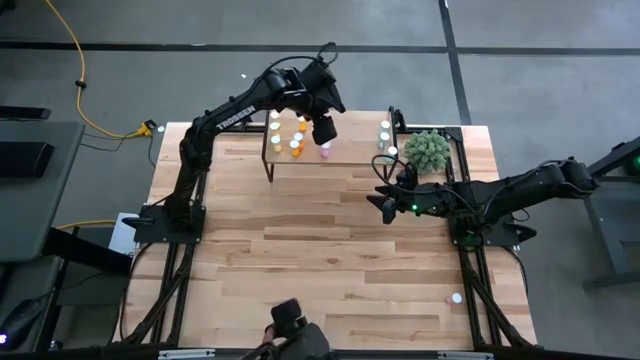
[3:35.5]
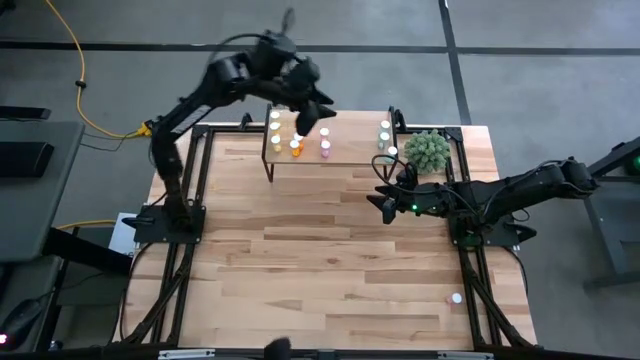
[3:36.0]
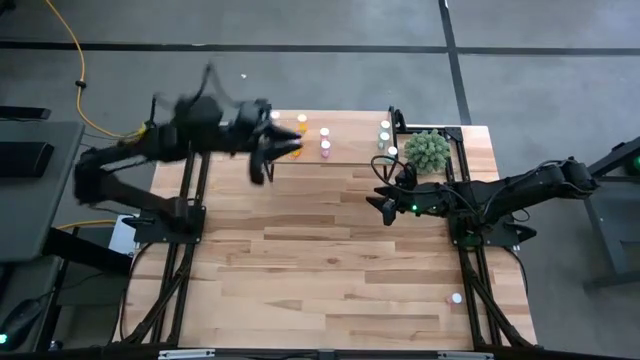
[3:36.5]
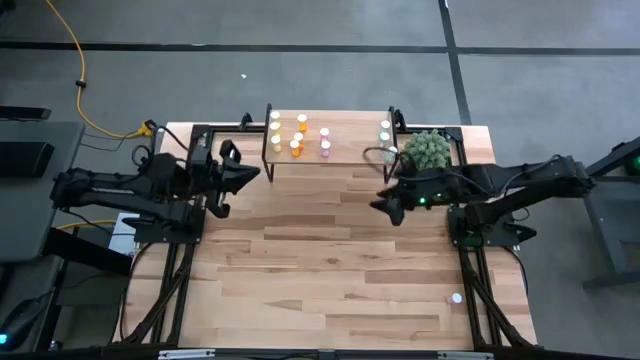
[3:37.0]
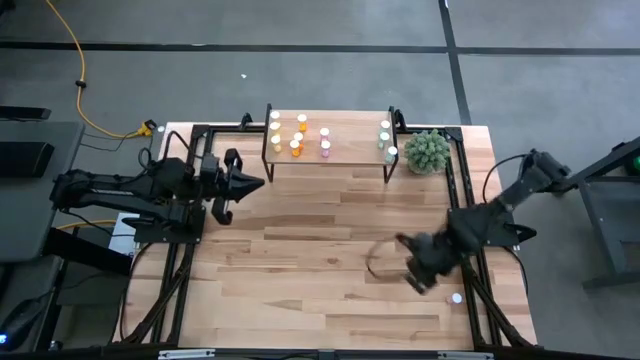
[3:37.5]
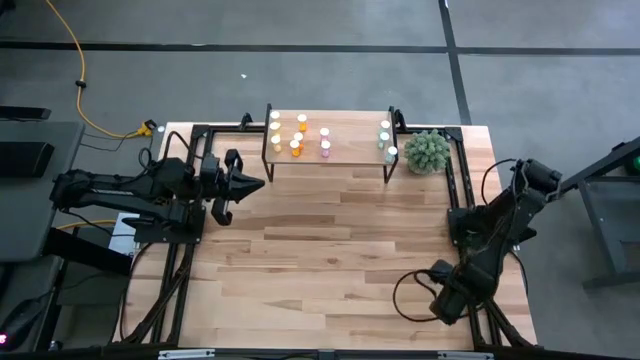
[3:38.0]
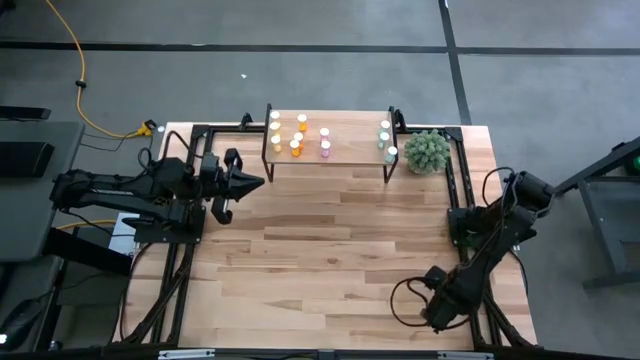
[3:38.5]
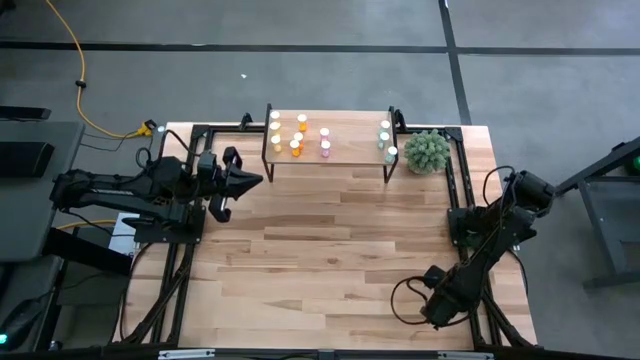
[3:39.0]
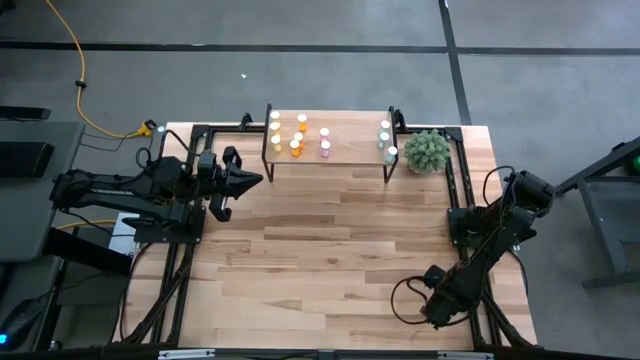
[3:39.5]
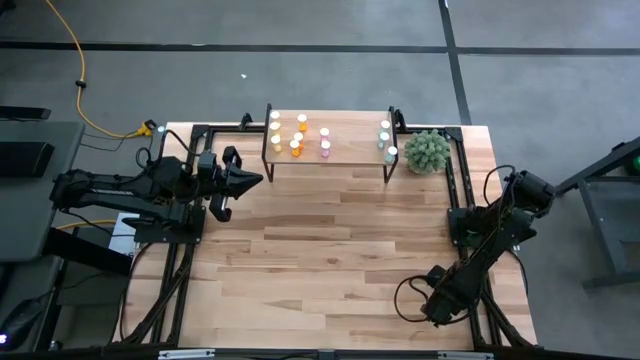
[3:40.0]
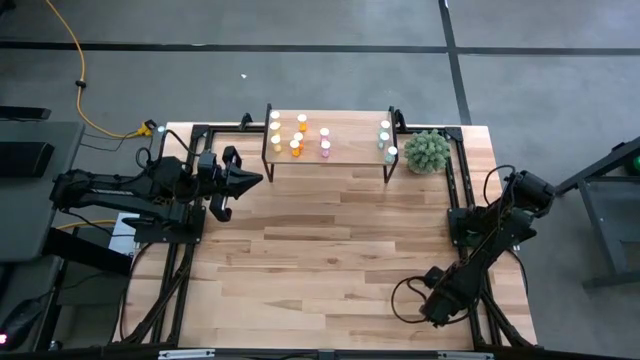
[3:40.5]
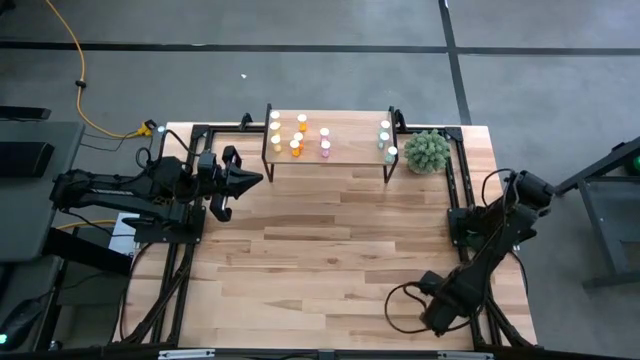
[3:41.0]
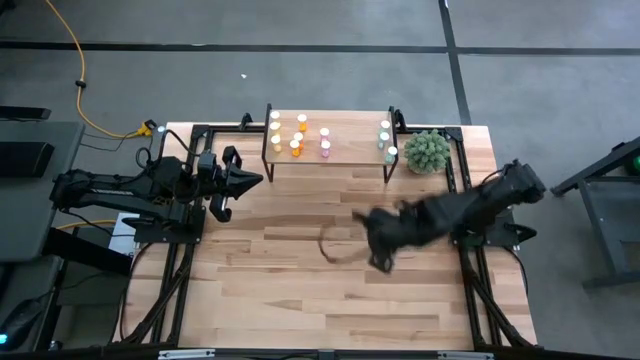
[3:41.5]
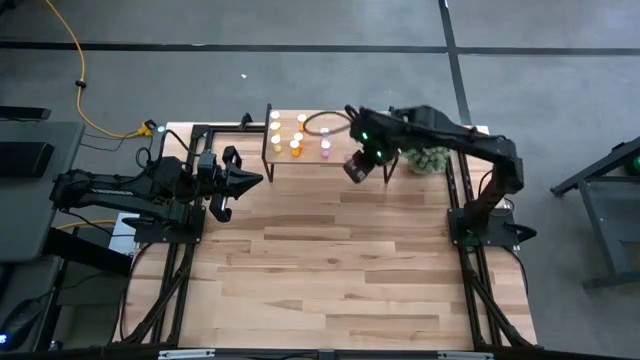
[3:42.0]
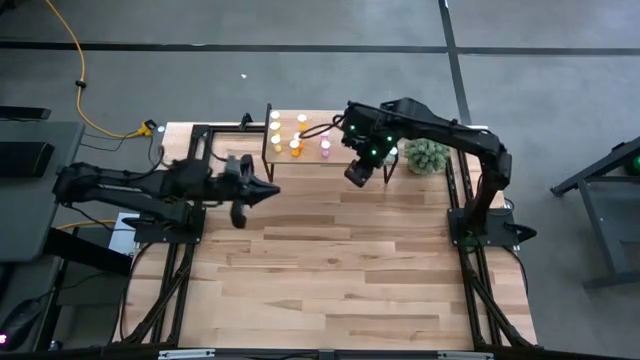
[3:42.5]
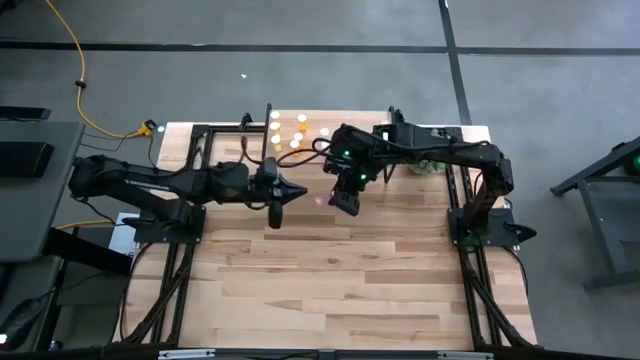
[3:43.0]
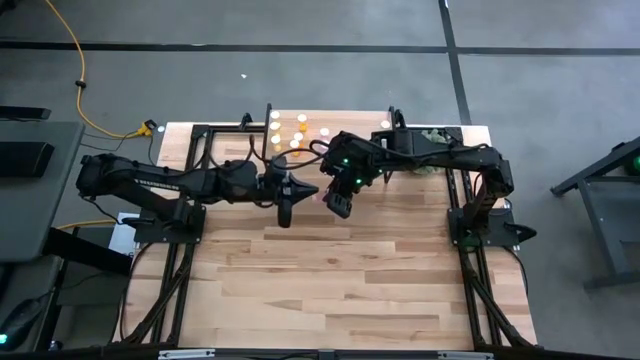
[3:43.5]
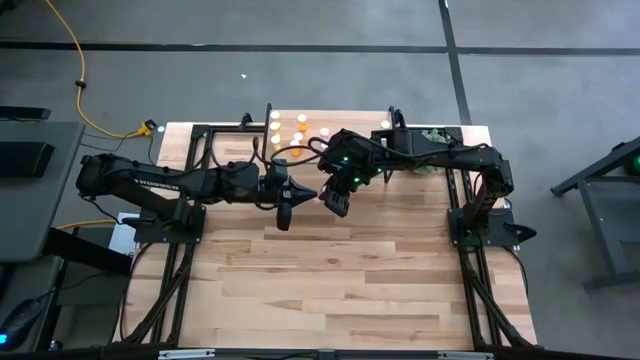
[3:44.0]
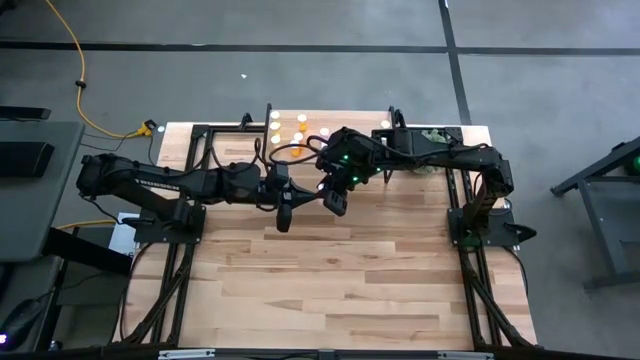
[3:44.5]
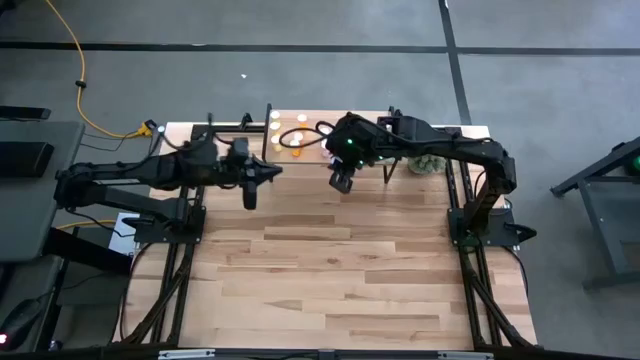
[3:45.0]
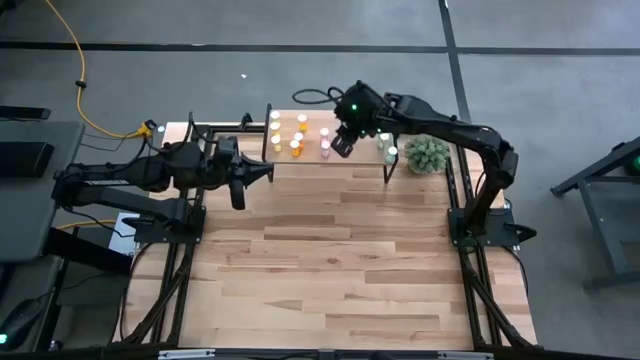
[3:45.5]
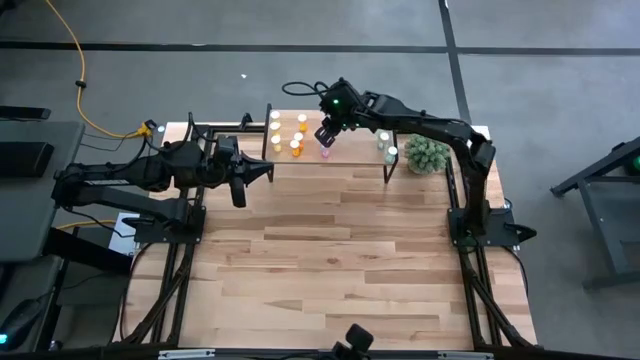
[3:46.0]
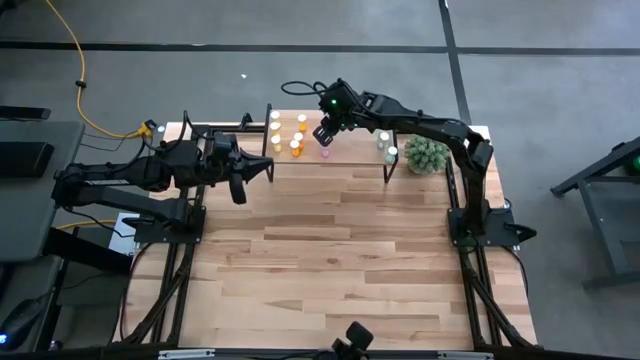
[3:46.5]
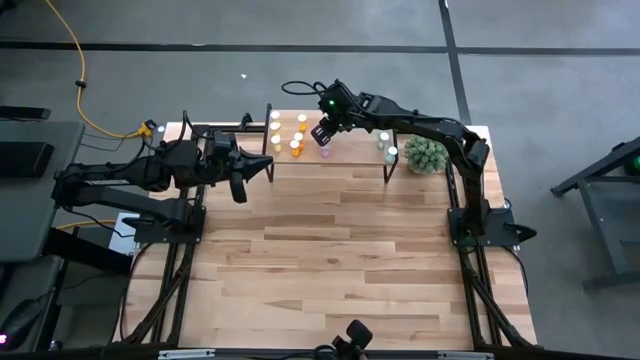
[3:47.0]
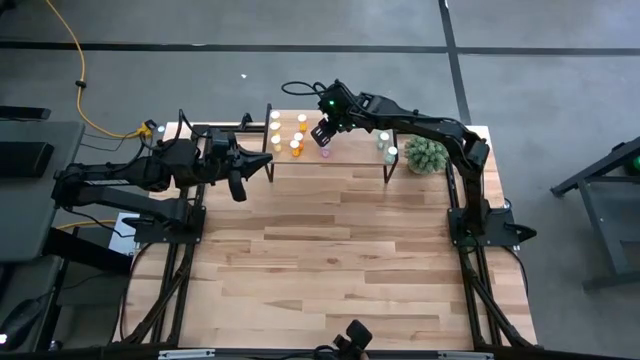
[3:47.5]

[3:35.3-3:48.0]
Task: Pick and place medicine bottles onto shelf by color
Put the pink pill bottle aligned with the other pink bottles on the shelf

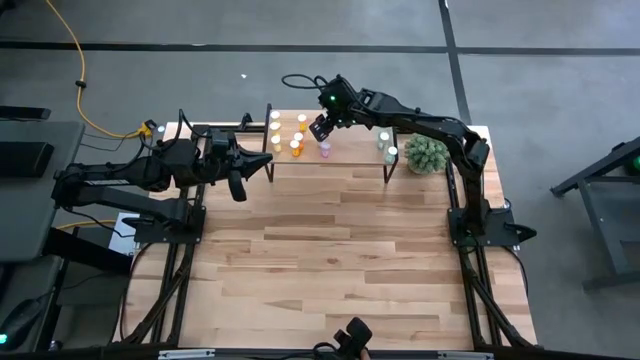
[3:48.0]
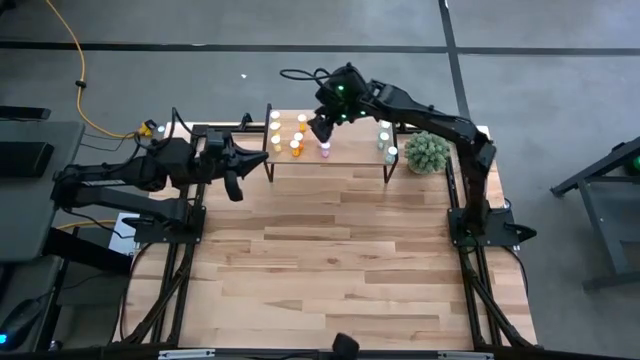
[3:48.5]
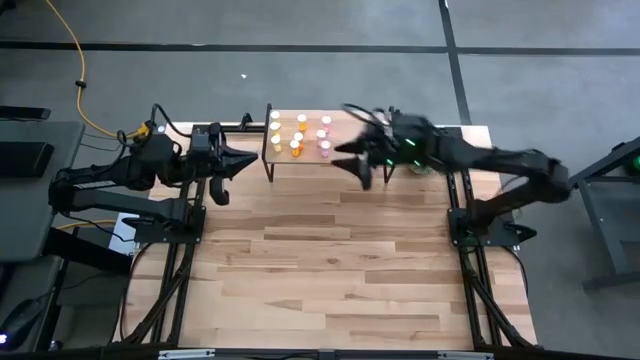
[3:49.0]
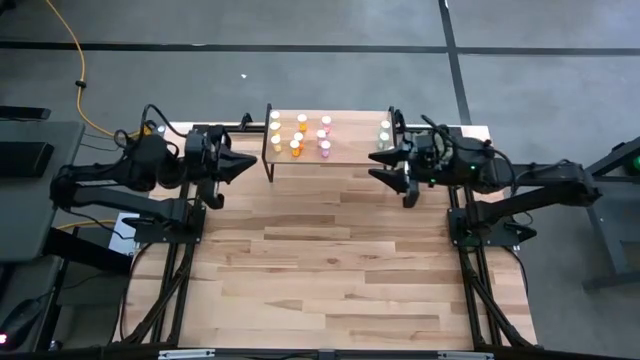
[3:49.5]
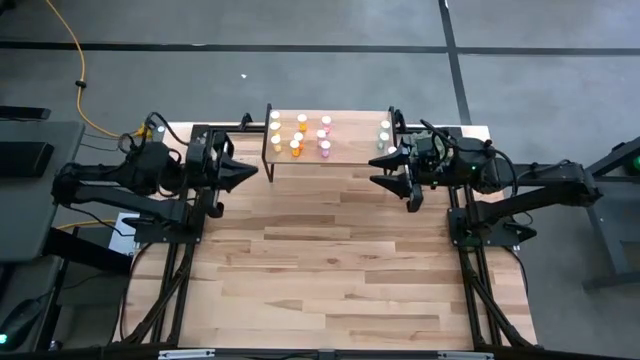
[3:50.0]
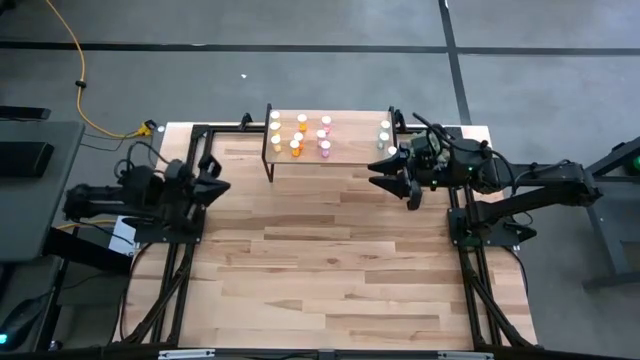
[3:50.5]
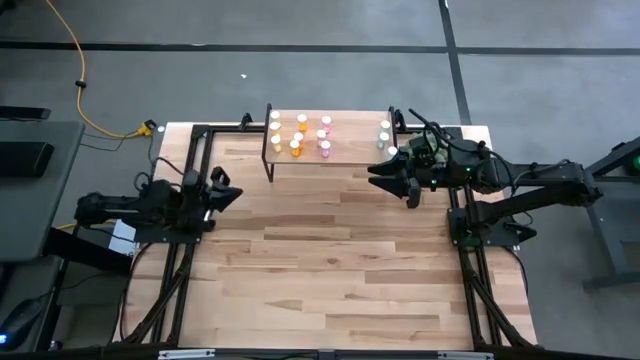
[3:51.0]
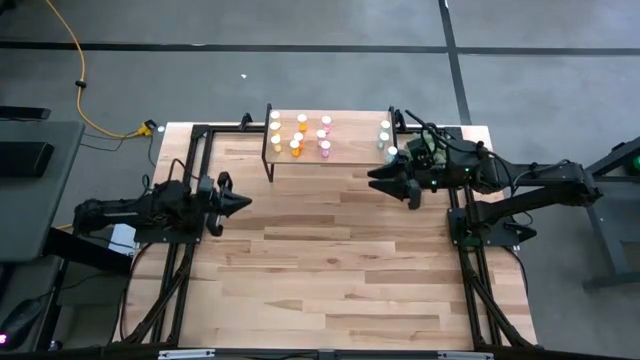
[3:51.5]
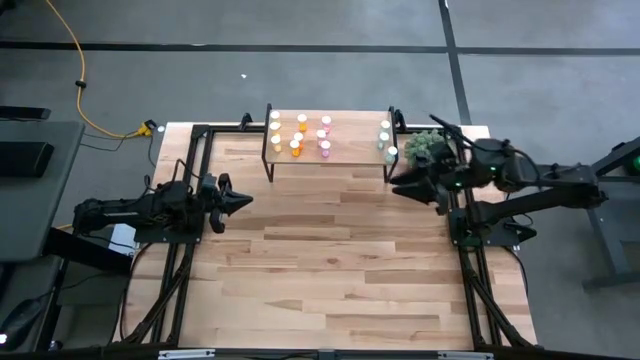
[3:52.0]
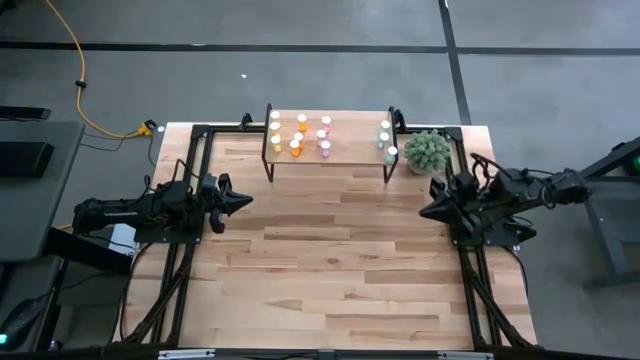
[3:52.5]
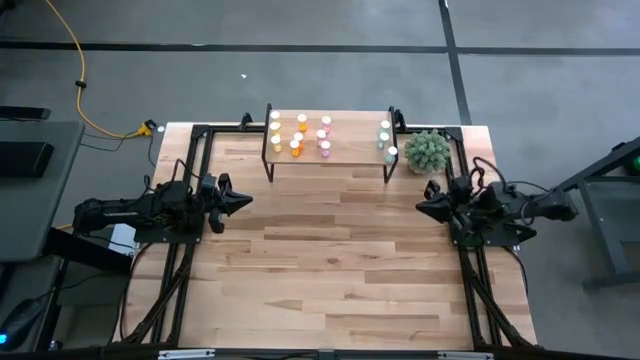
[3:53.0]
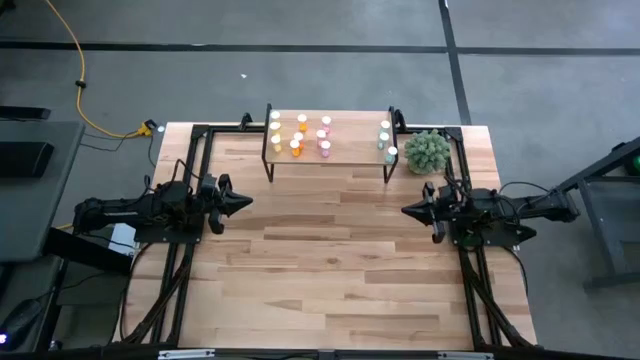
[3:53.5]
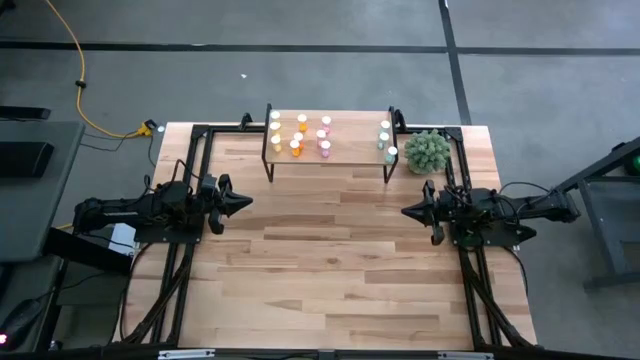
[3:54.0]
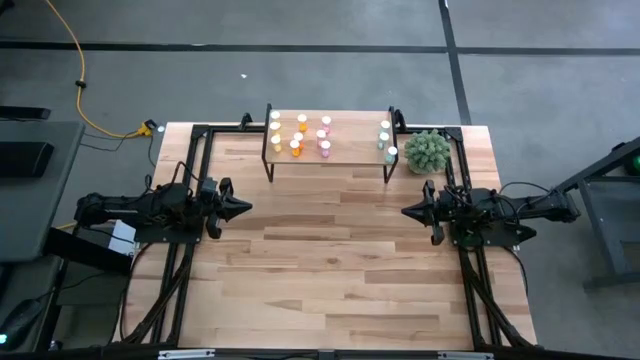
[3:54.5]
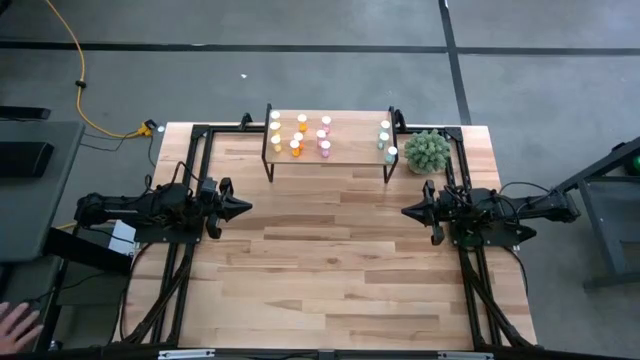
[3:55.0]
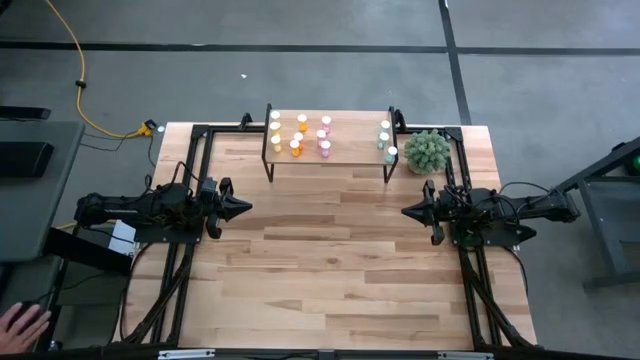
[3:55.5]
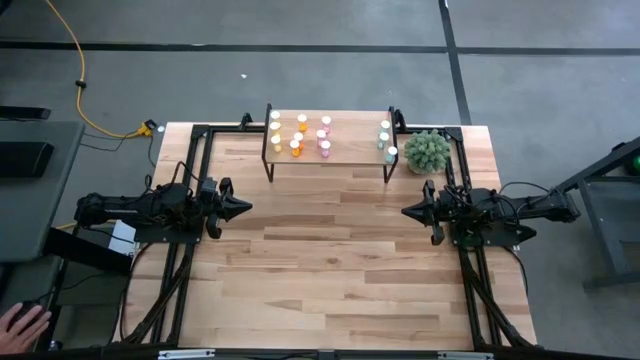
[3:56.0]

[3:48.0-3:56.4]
Return to Home Position

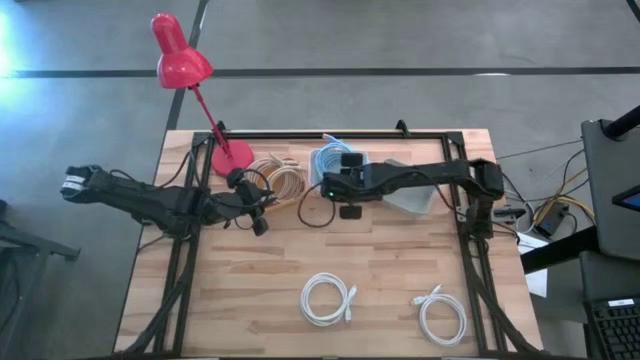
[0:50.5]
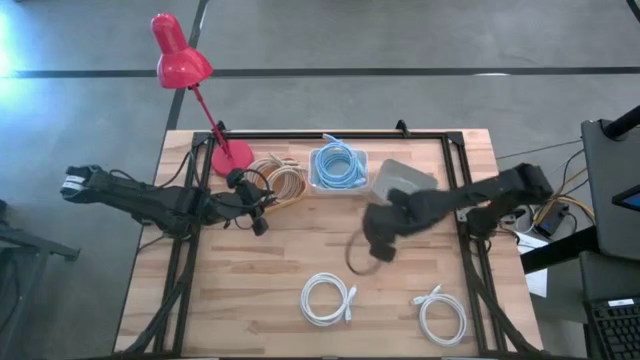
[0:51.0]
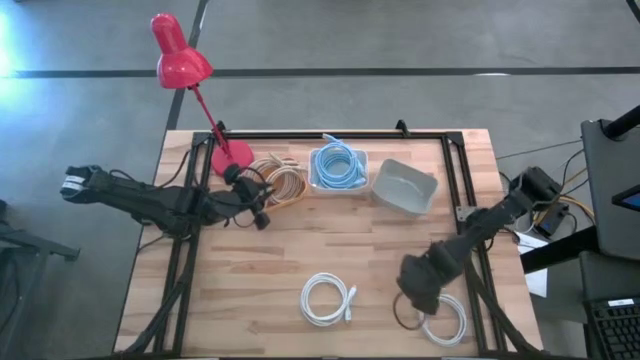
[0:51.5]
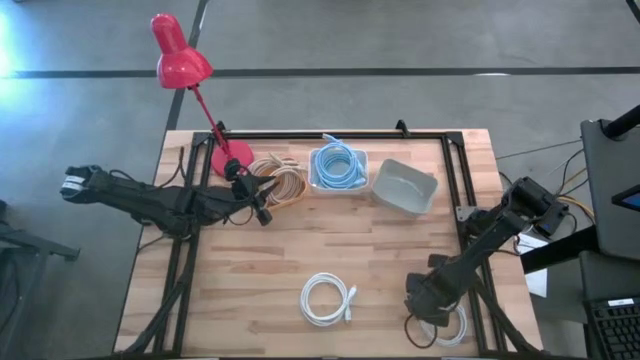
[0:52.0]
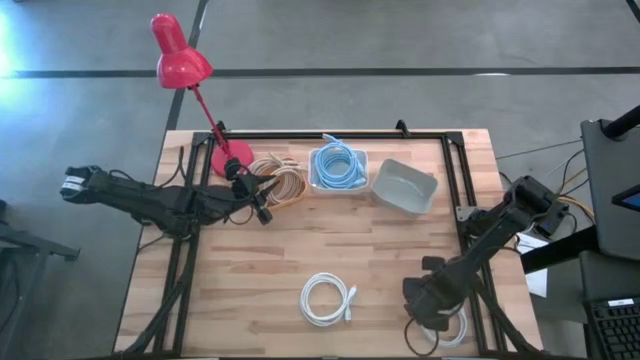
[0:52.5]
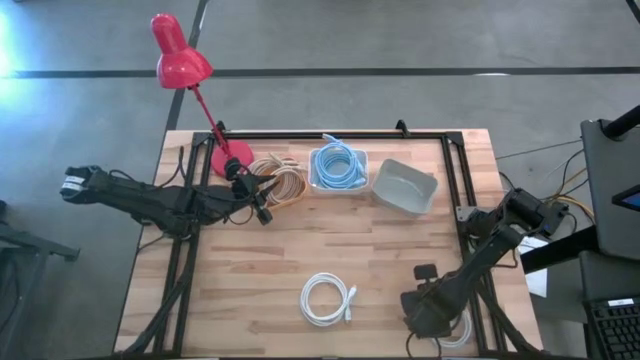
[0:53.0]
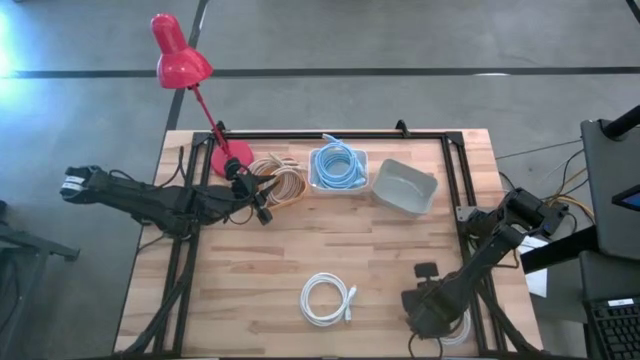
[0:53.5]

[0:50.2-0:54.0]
Task: Pick & Place USB Port
Put the right white usb cable into the grey bin
